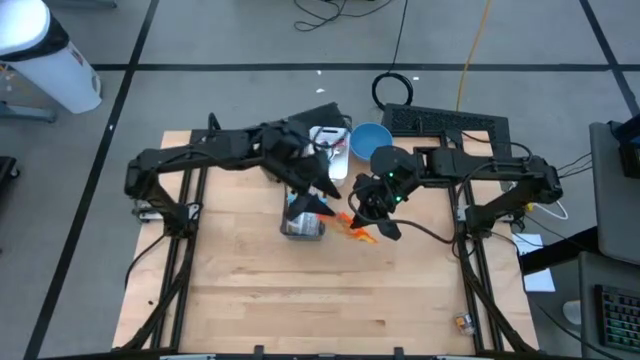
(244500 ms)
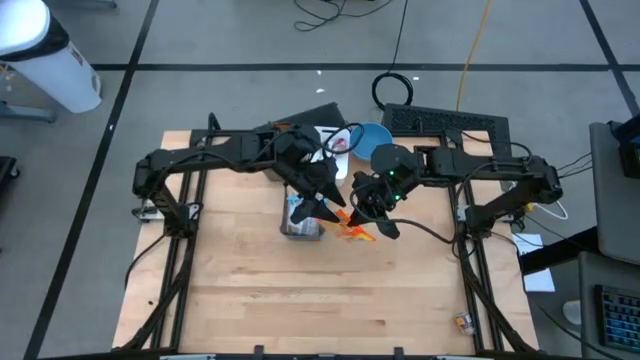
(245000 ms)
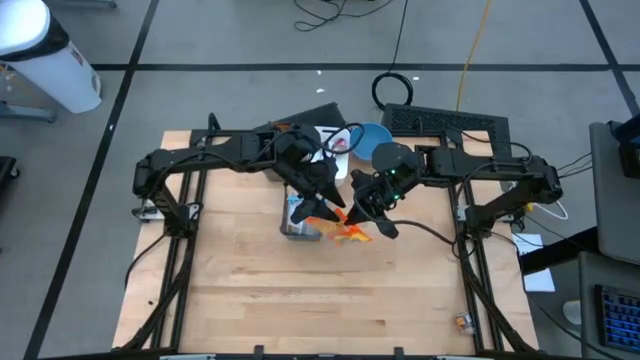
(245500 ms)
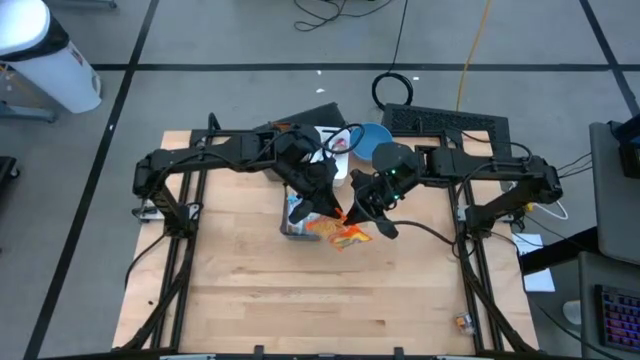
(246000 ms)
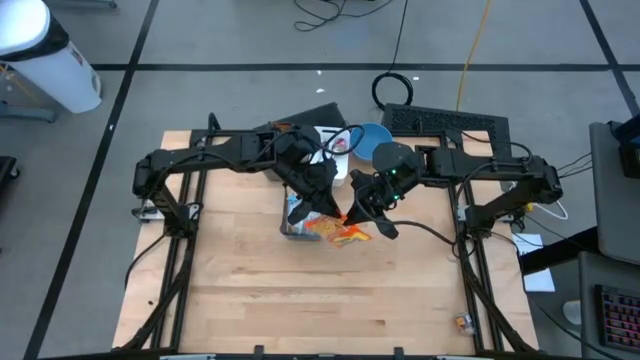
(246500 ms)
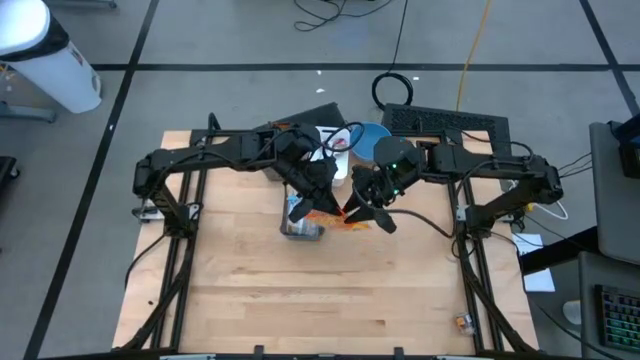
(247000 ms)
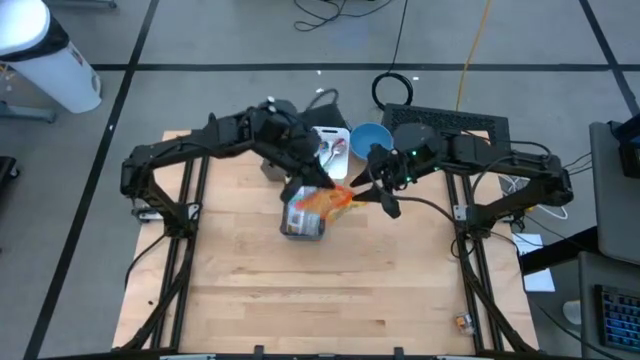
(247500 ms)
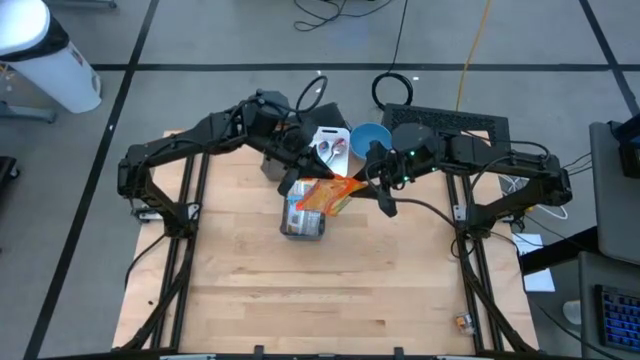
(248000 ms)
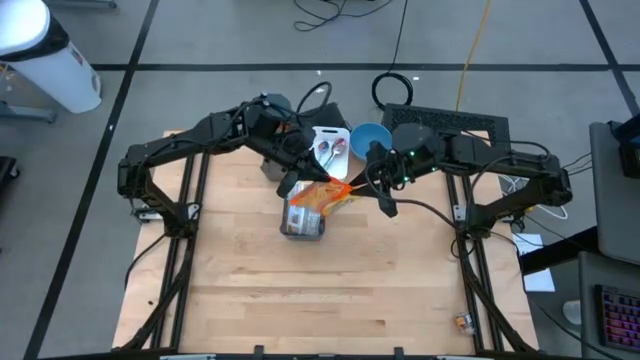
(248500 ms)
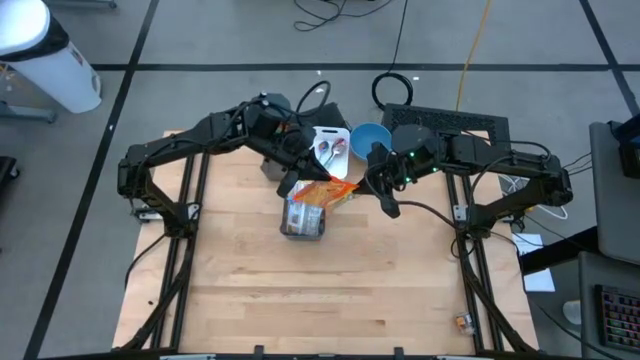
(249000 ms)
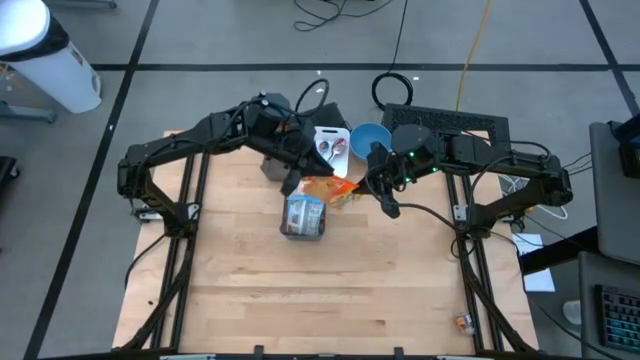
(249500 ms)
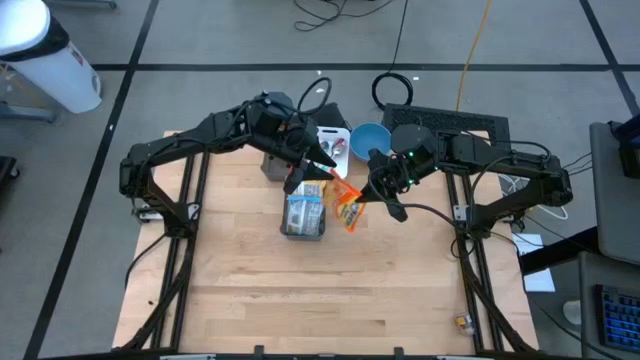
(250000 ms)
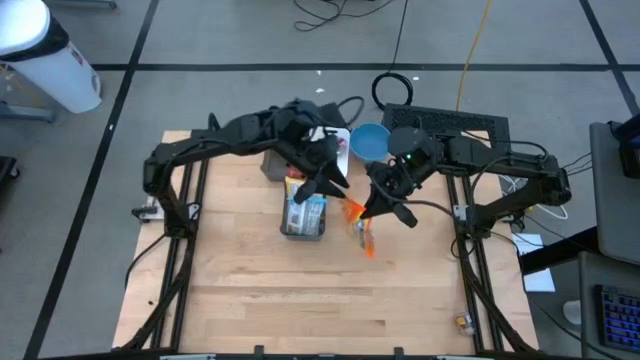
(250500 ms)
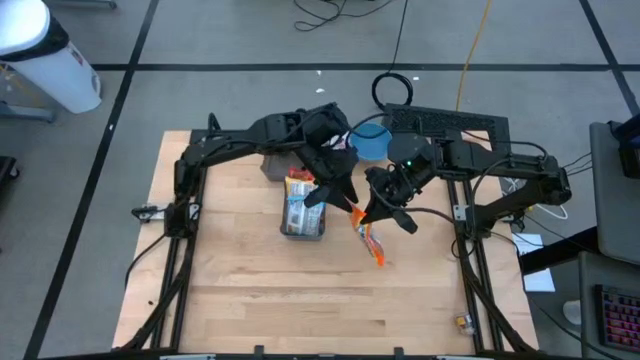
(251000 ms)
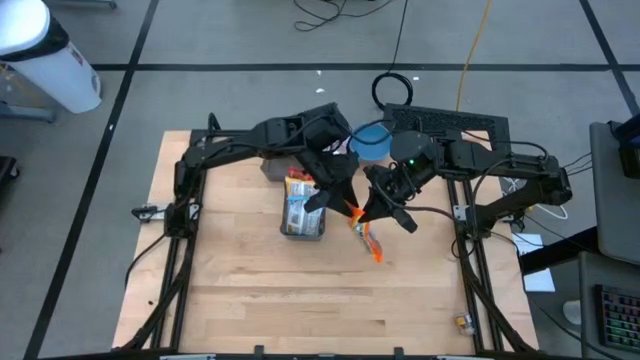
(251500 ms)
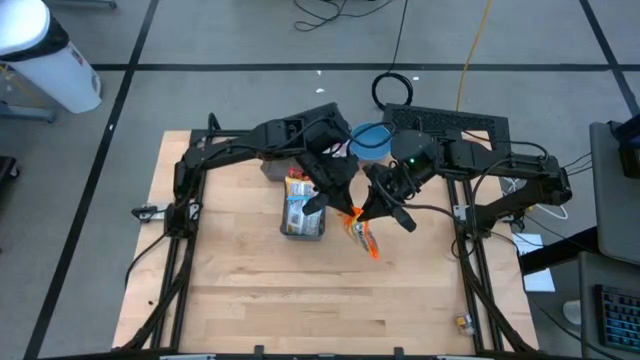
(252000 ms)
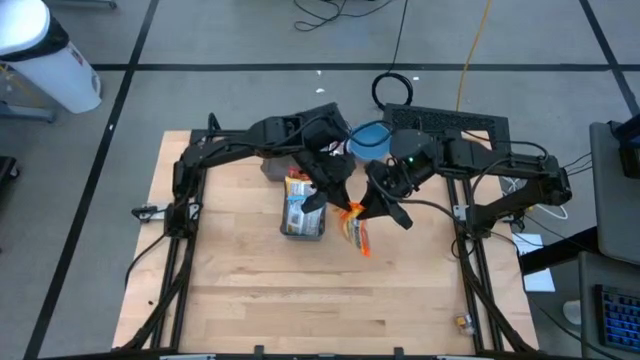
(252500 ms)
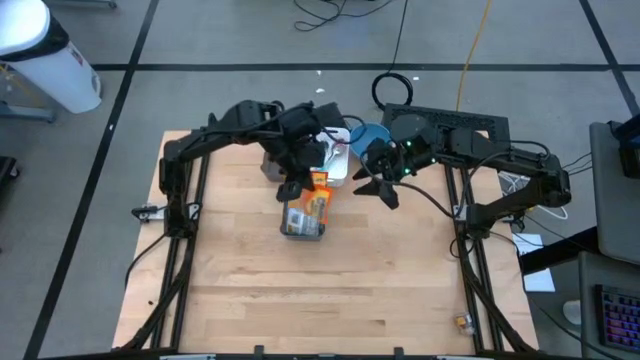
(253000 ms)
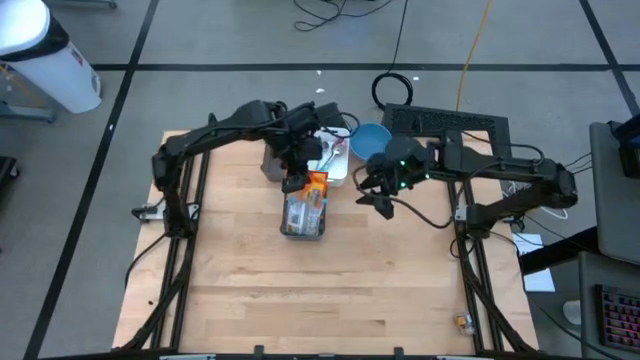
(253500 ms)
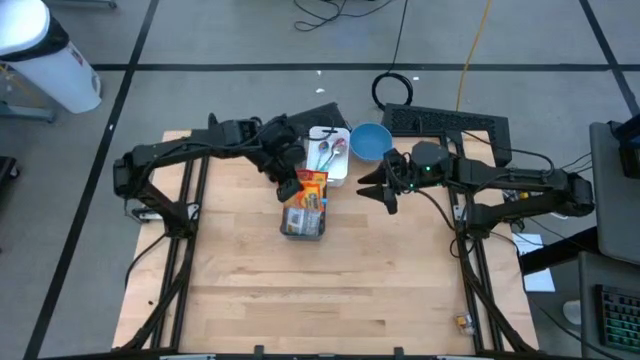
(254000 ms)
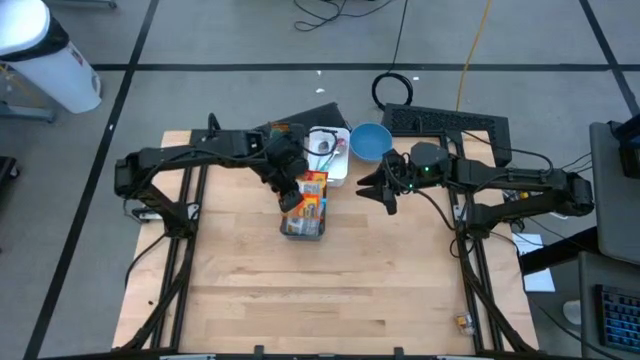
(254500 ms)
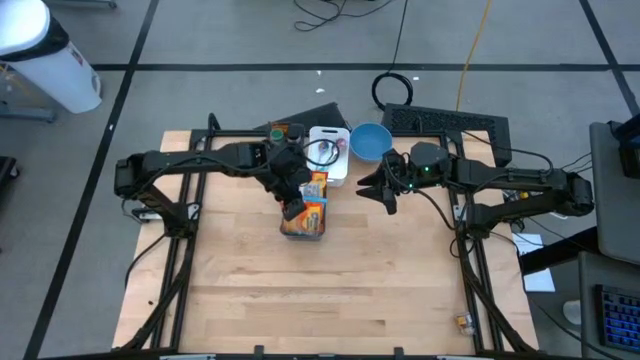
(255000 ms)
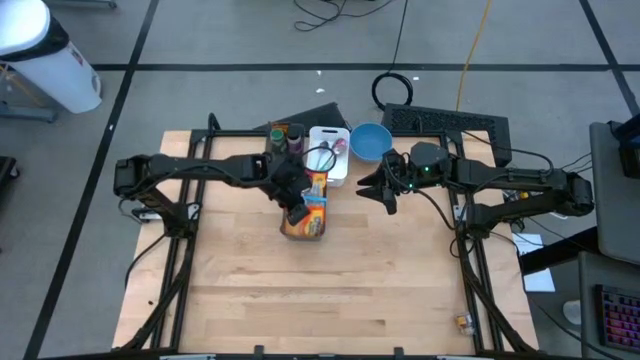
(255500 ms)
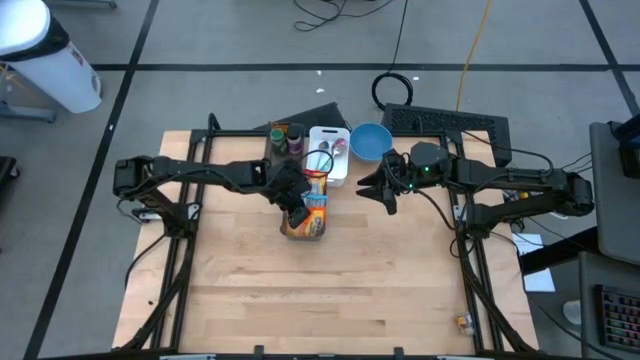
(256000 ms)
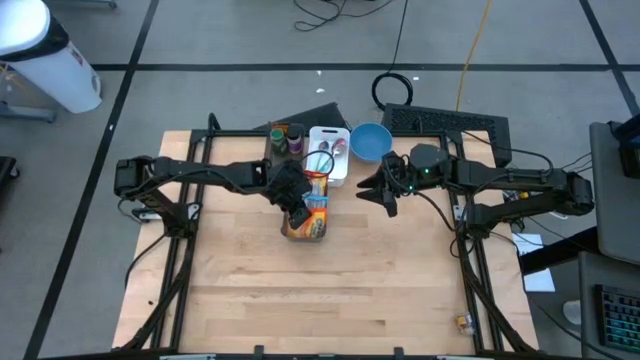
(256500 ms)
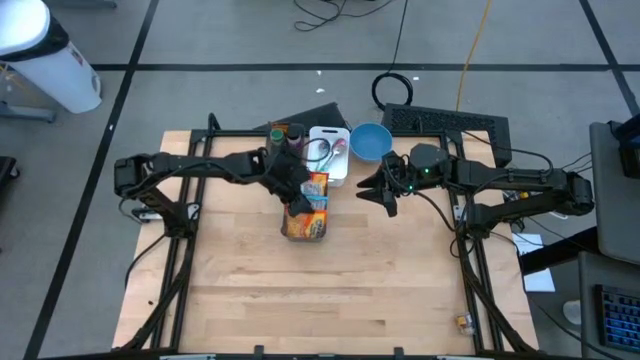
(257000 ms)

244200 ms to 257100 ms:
Task: Pick & Place Food Item
Put the orange noodle pack into the bottom black bin

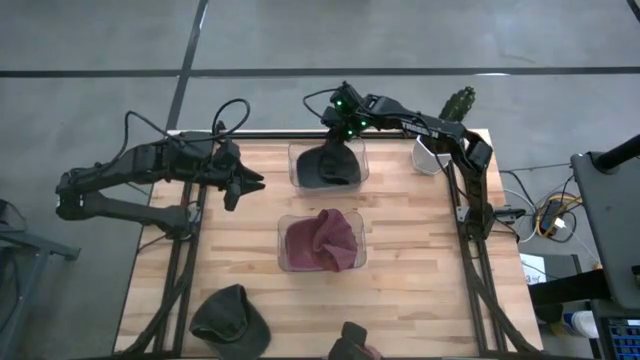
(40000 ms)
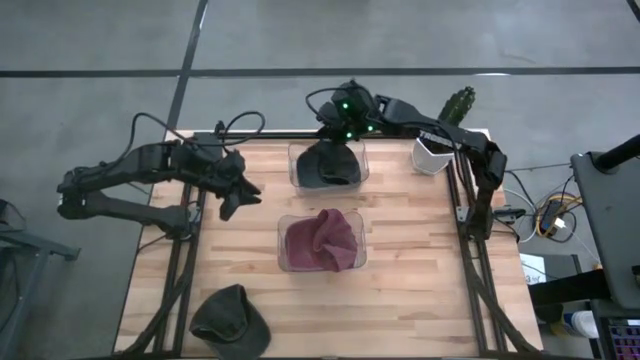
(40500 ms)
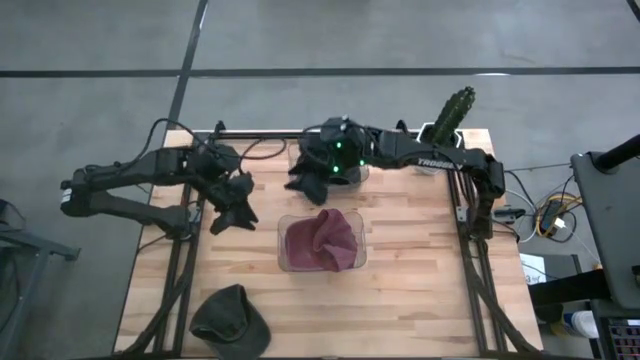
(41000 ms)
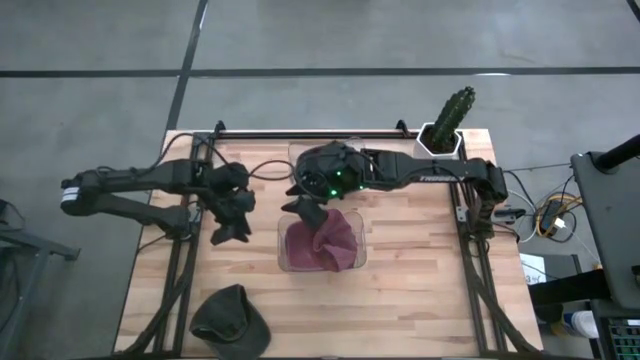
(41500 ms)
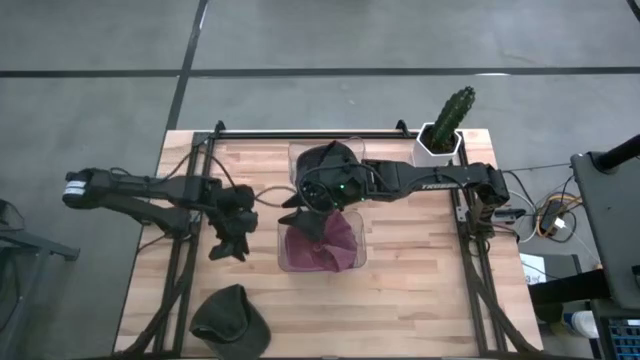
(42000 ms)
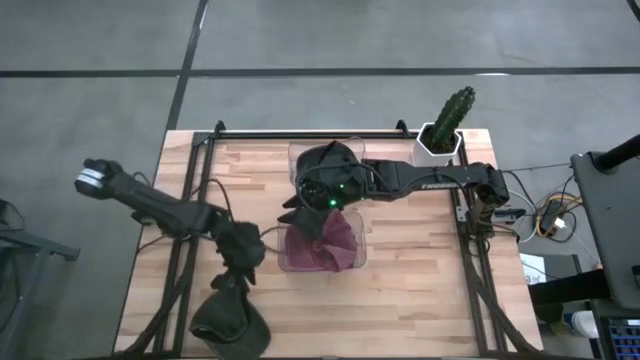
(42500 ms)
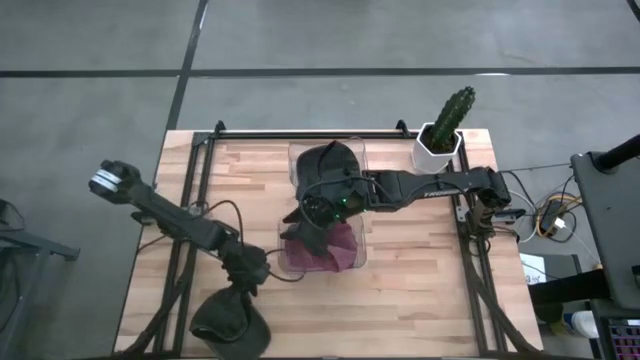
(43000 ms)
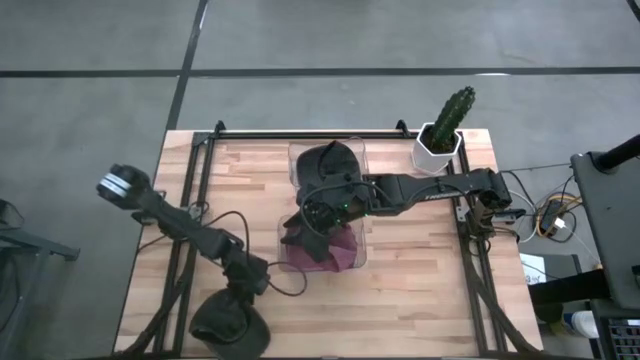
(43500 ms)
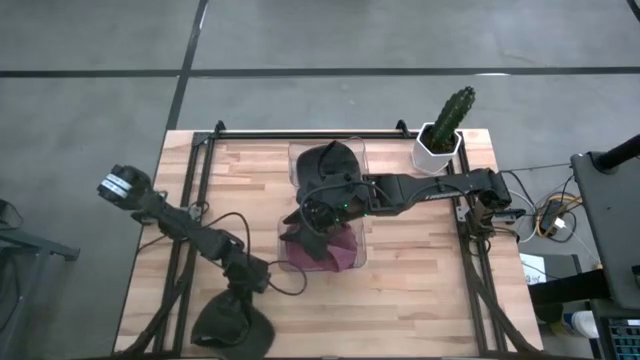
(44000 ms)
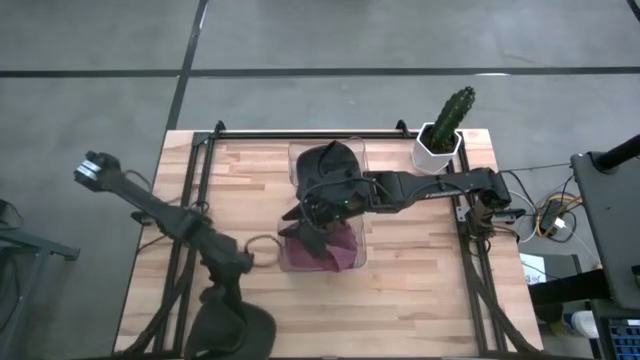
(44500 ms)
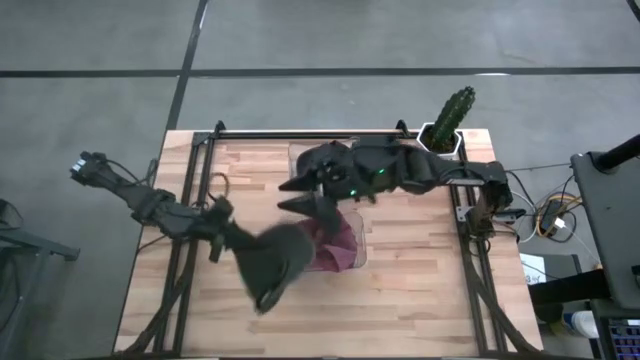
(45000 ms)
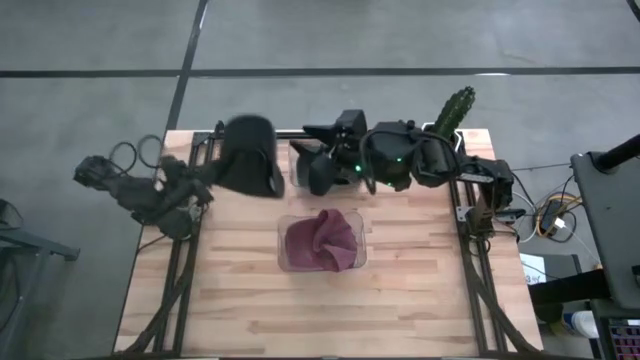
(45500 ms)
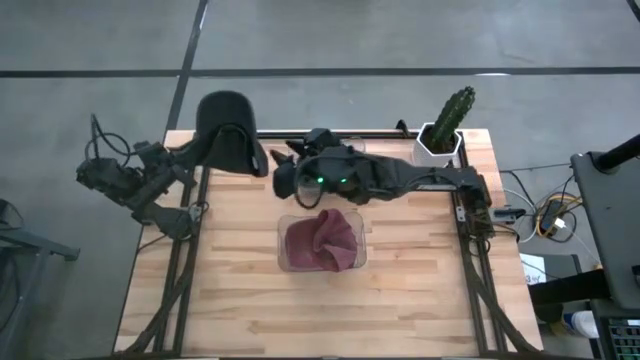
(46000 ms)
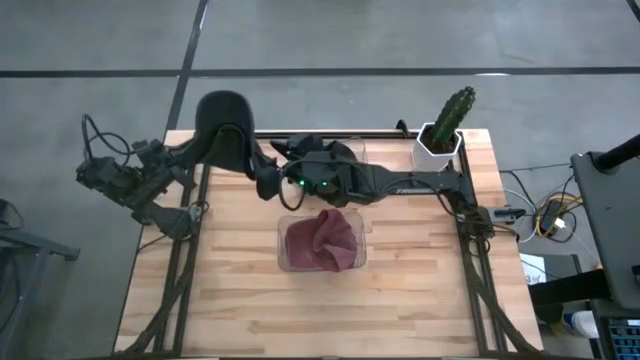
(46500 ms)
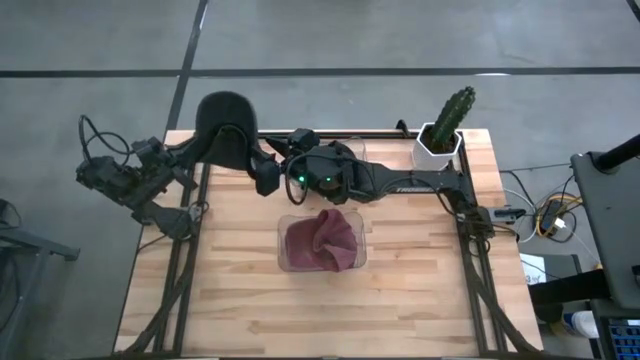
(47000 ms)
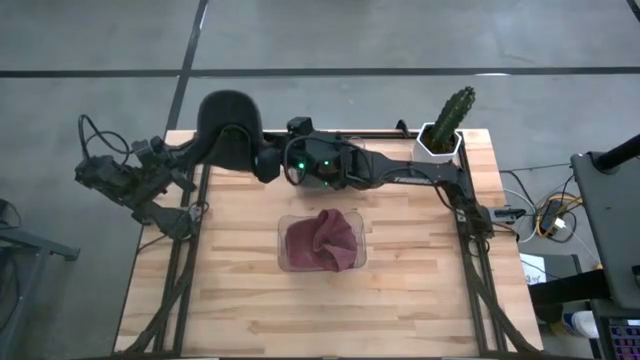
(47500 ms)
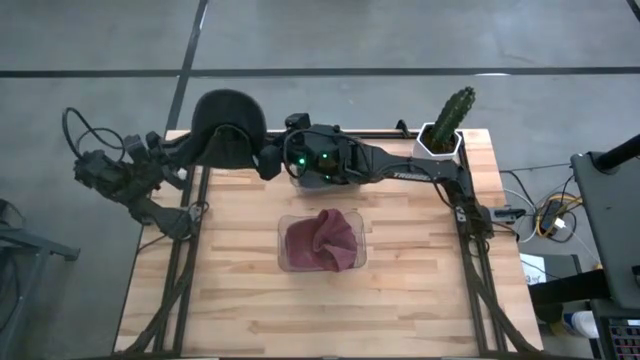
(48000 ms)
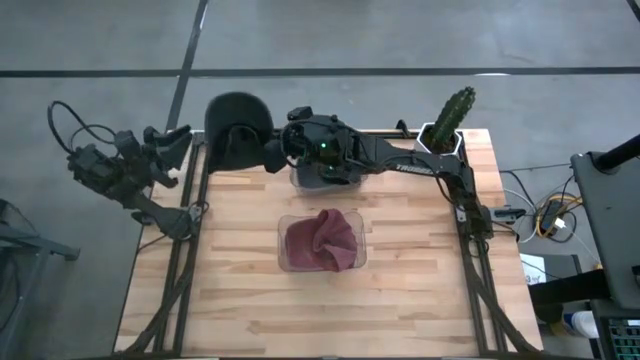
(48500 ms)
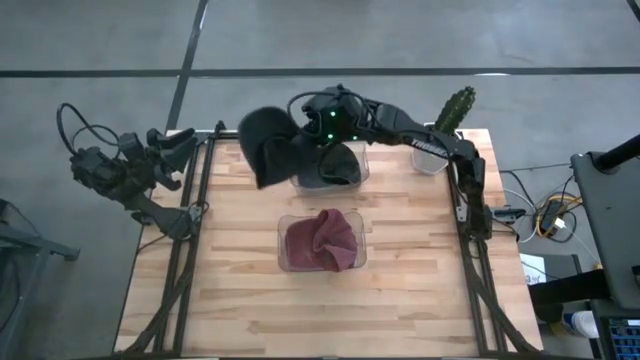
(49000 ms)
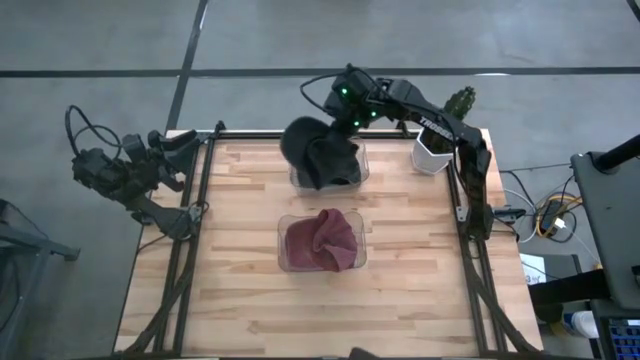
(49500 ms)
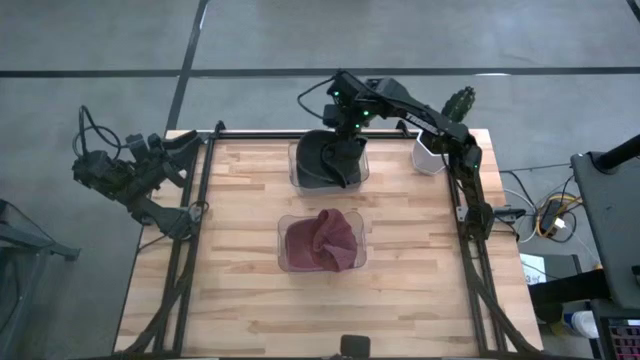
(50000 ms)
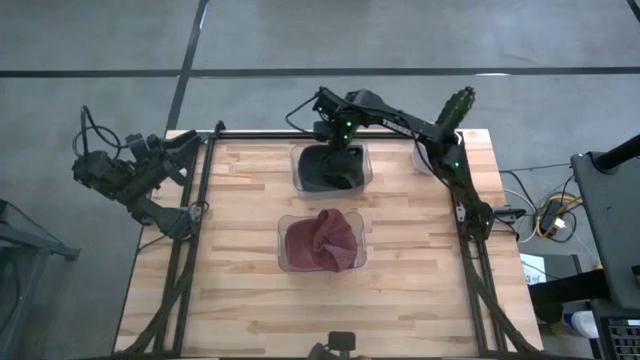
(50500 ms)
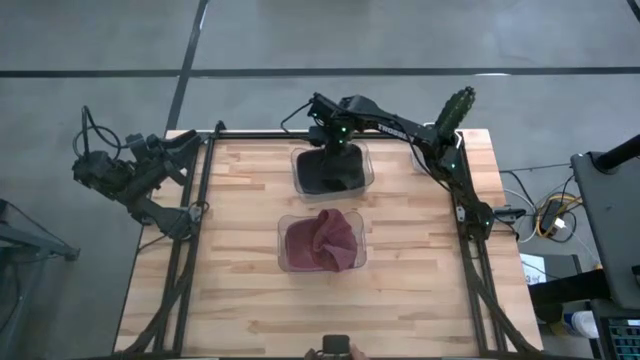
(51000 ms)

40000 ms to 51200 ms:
Task: Pick & Place hat
Put the black cap into the top transparent bin
